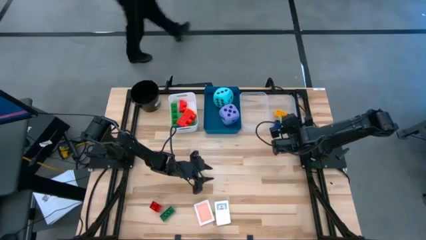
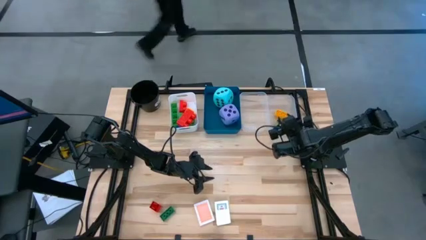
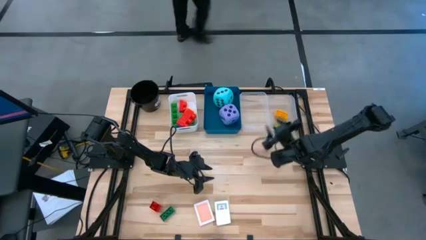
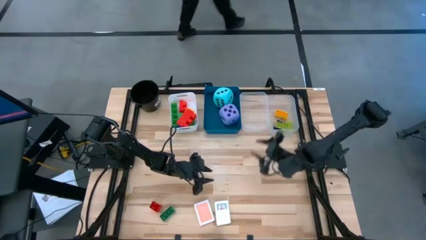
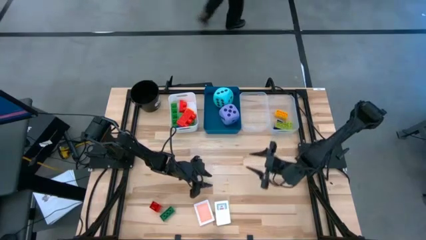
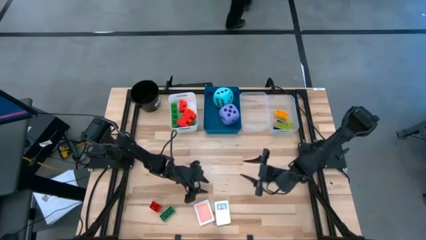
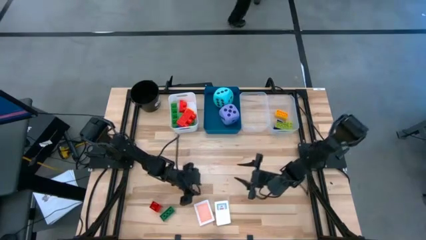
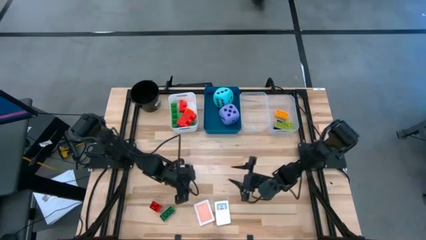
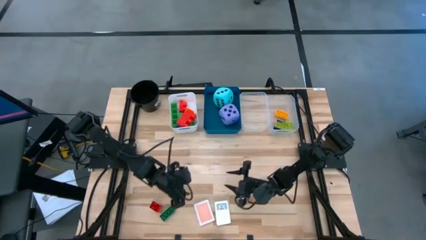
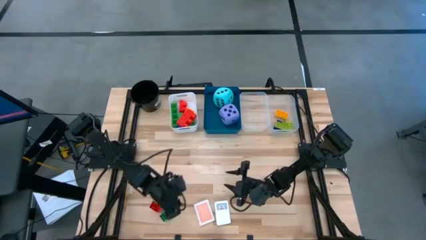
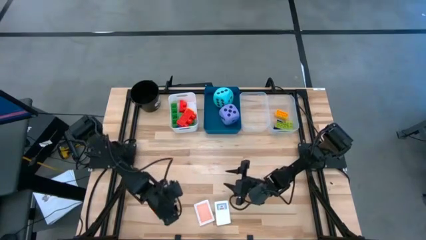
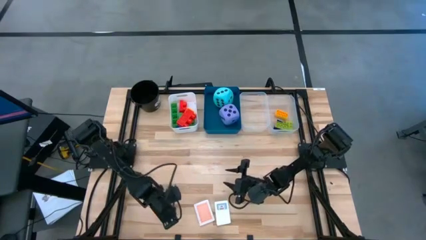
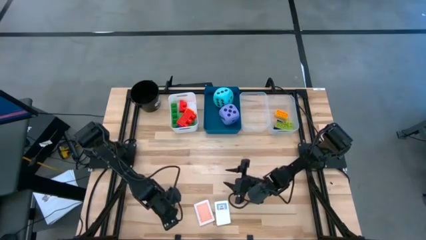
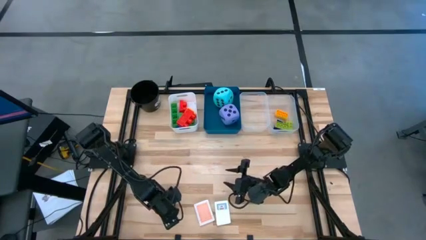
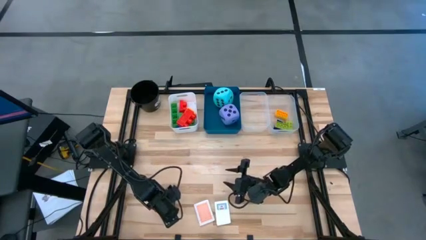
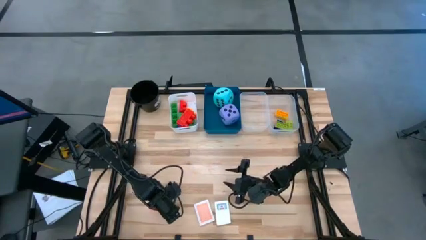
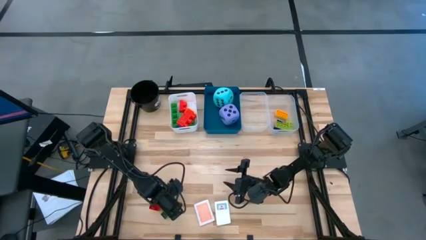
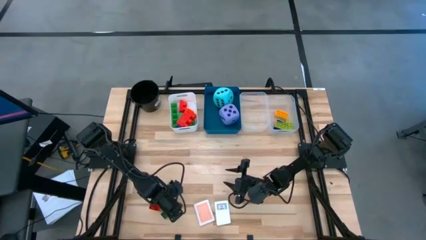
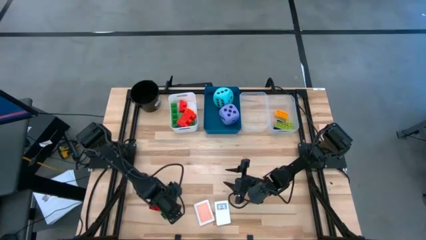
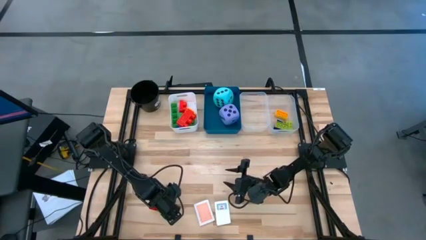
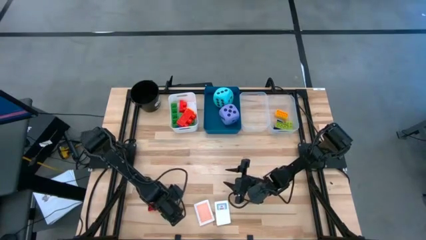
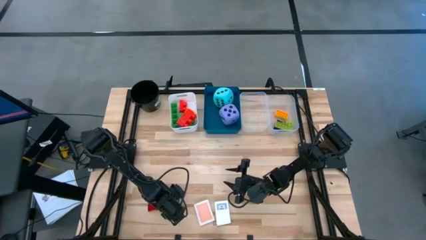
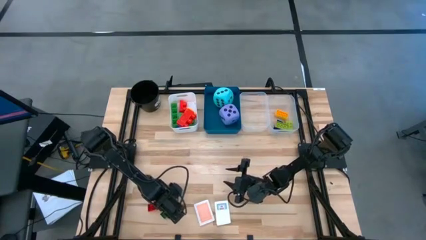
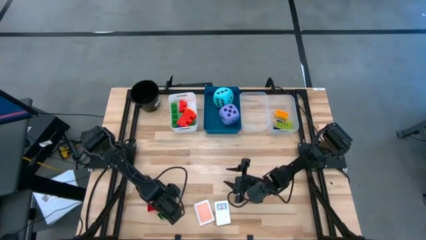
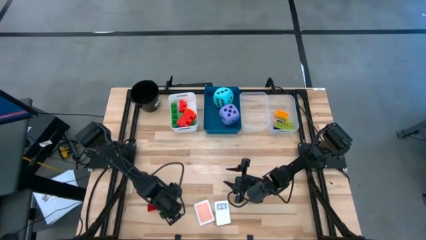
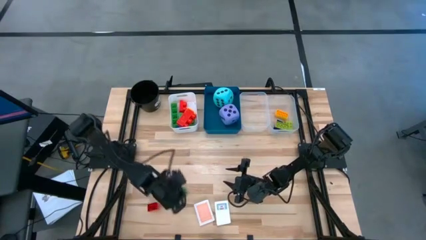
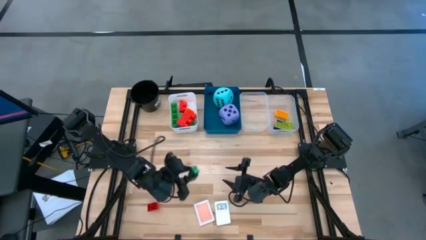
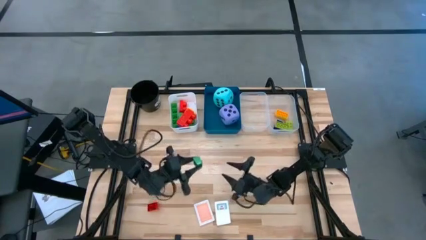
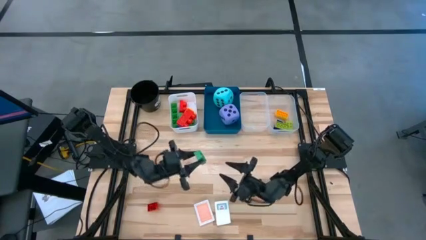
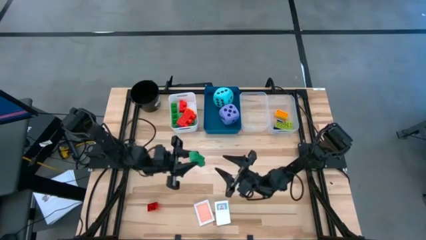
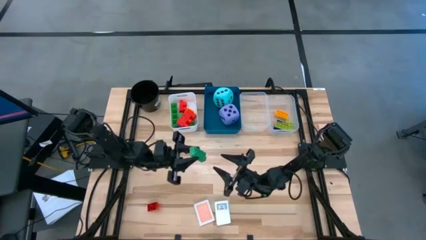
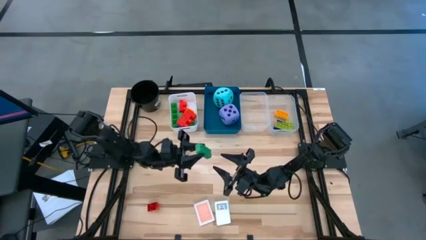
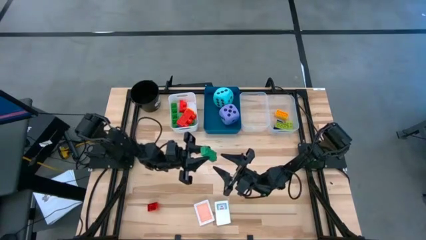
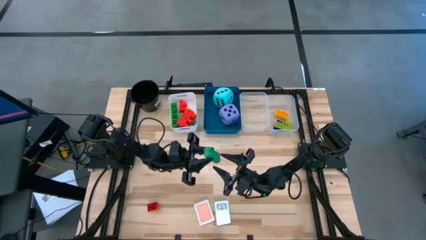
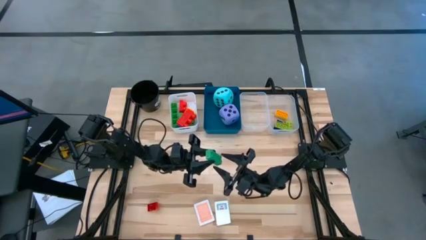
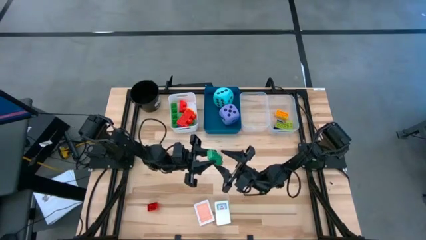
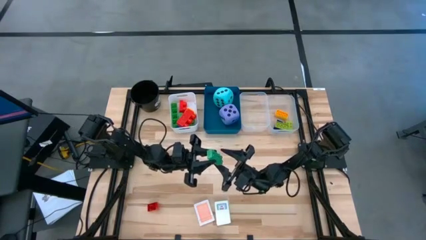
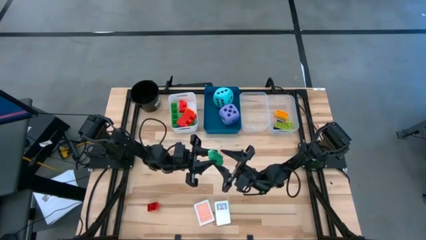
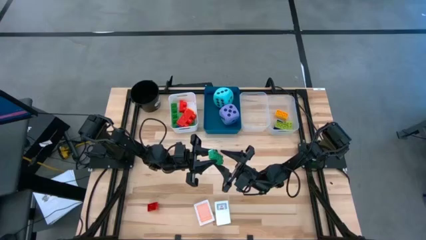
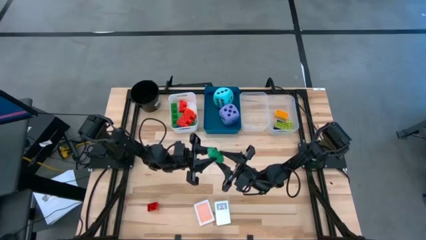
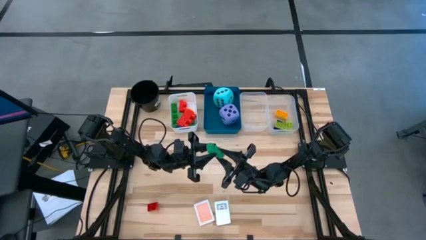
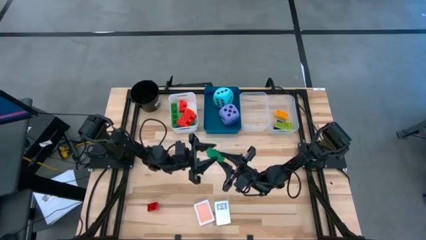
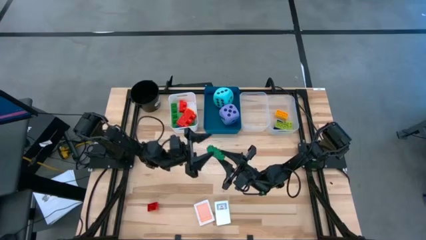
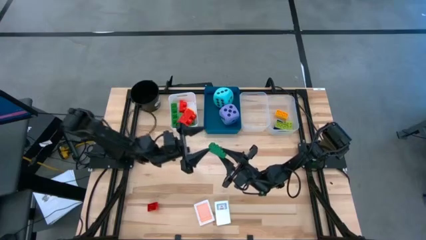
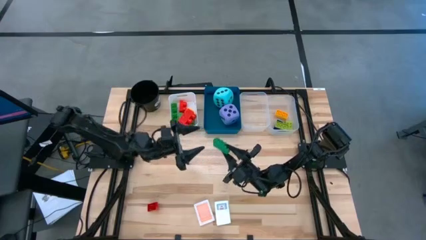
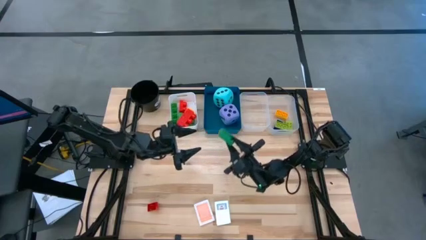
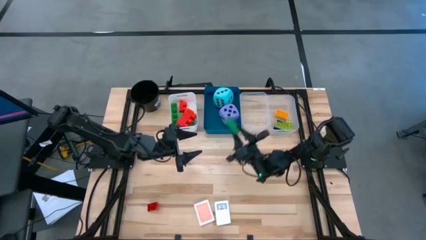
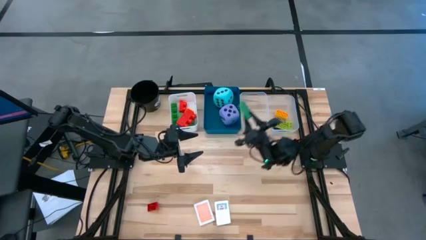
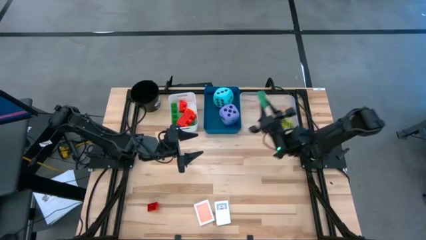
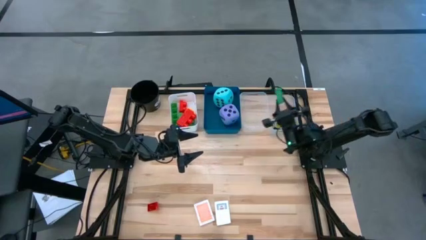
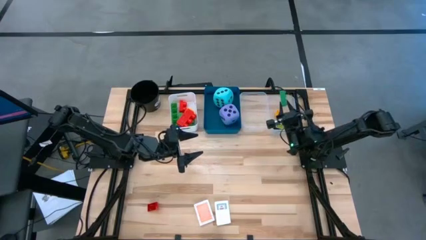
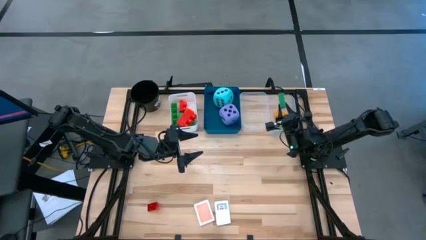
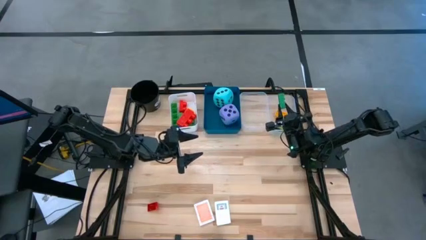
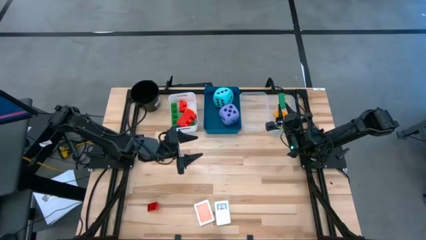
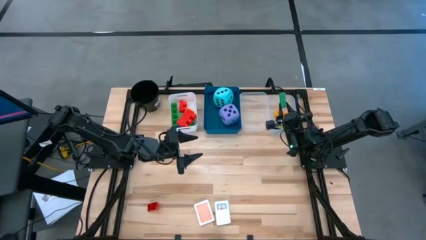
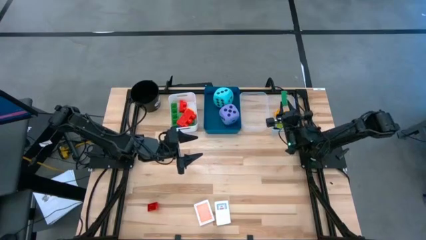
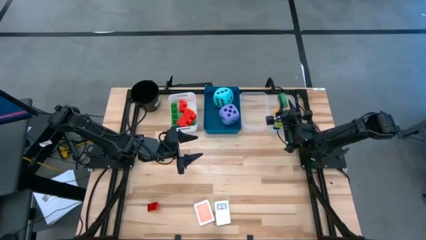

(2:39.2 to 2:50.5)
Task: Pick & Place Toys
Put the small green game piece into the right transparent bin

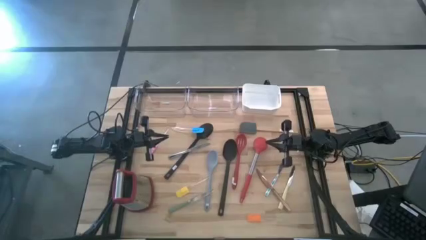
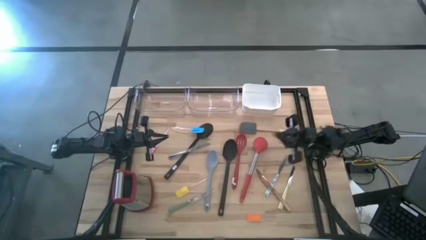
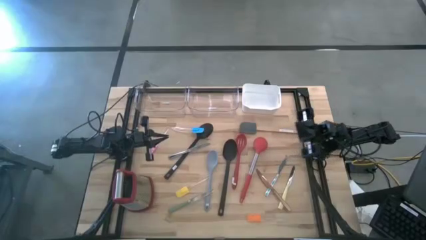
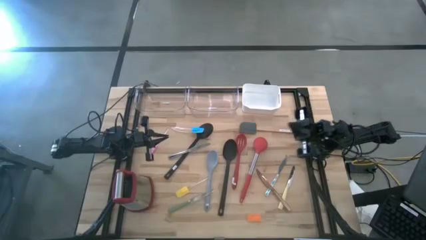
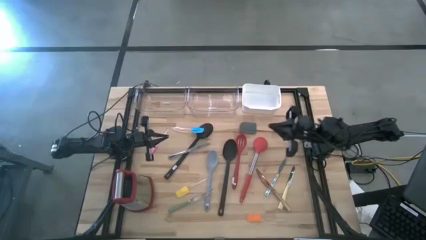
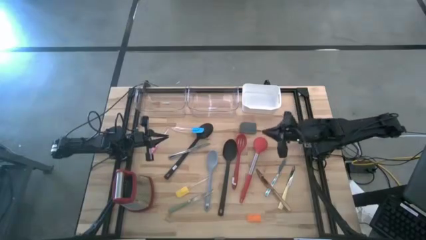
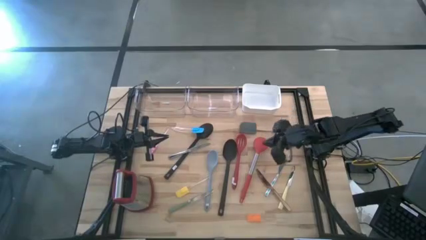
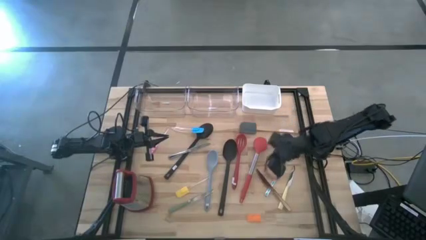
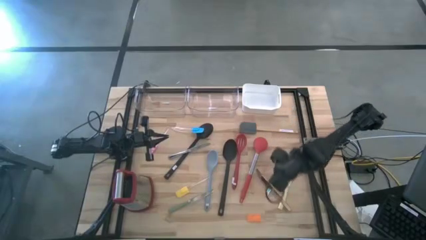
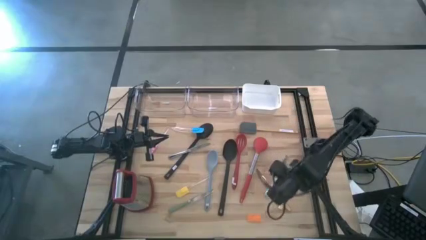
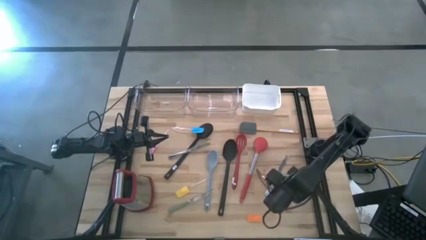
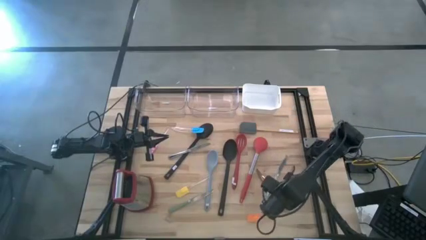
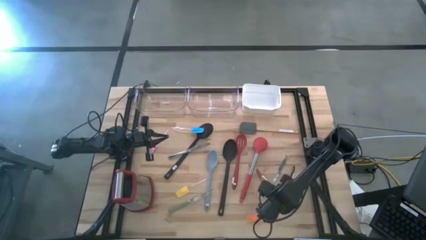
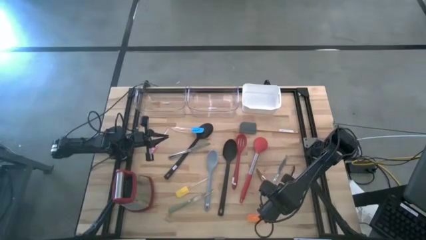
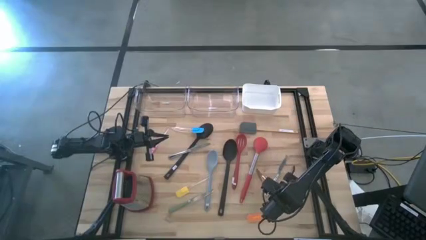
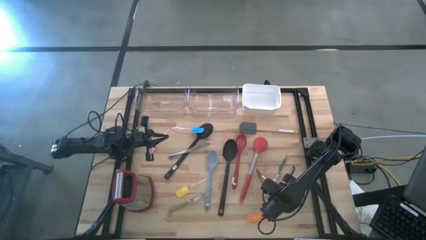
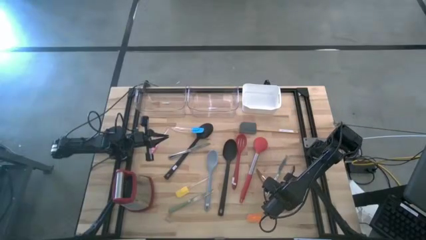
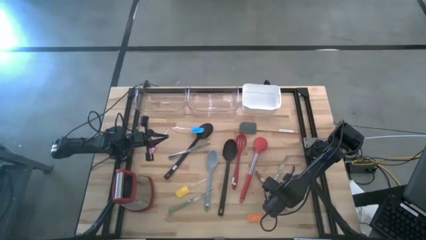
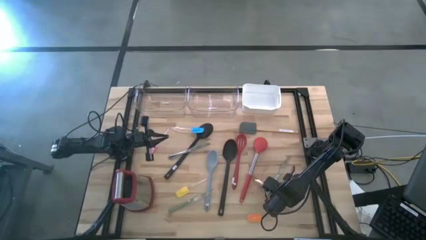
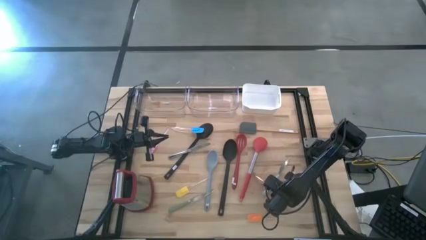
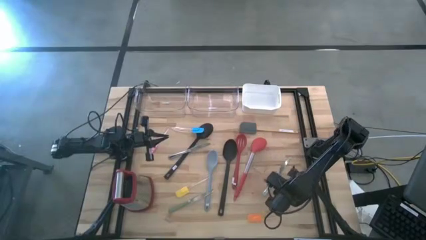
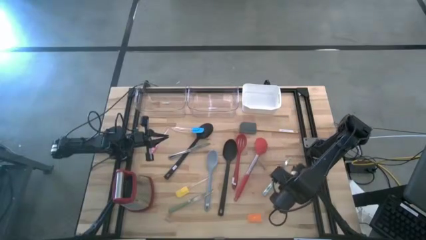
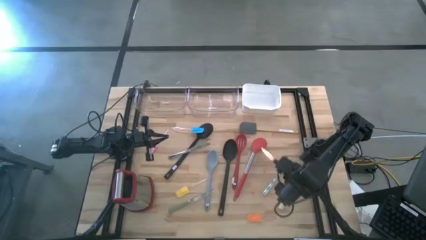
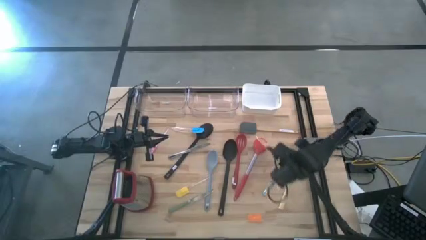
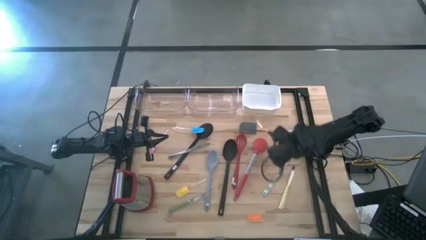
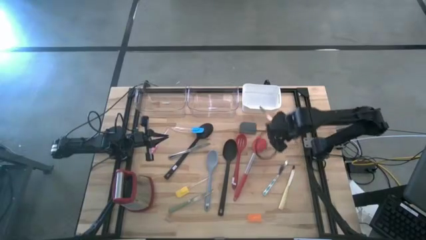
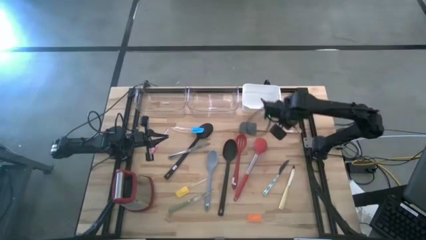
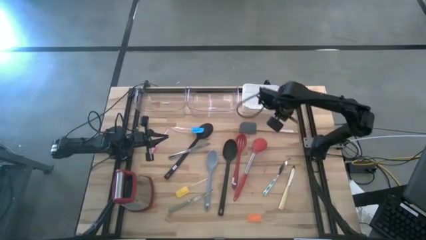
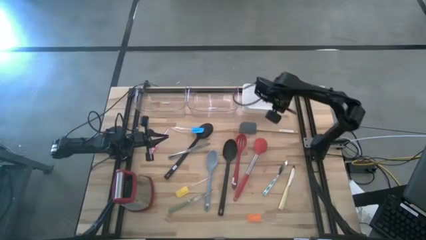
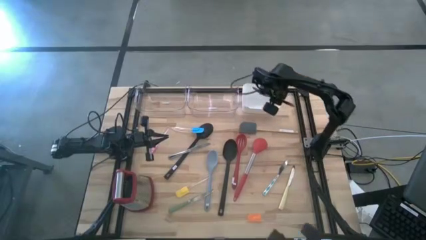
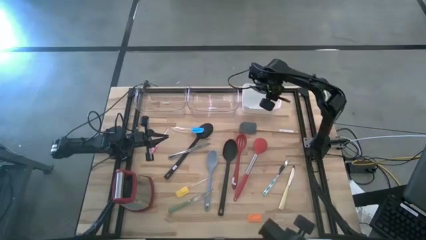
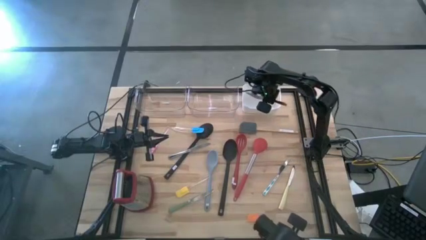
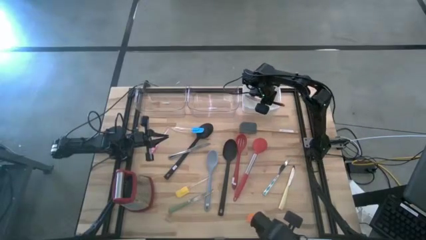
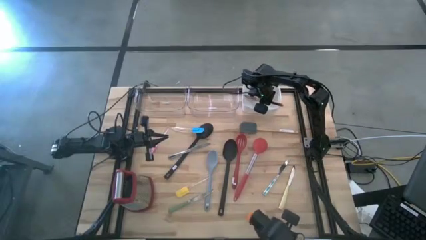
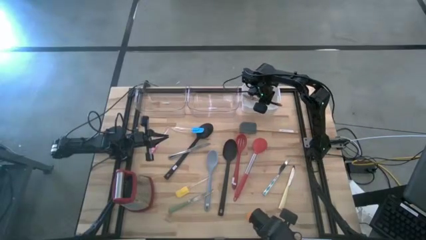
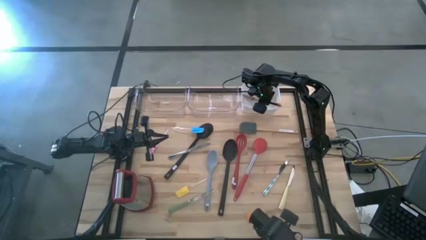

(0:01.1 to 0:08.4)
Task: Pick & Place Kitchen Items
Put the bronze table knife into the white bin
